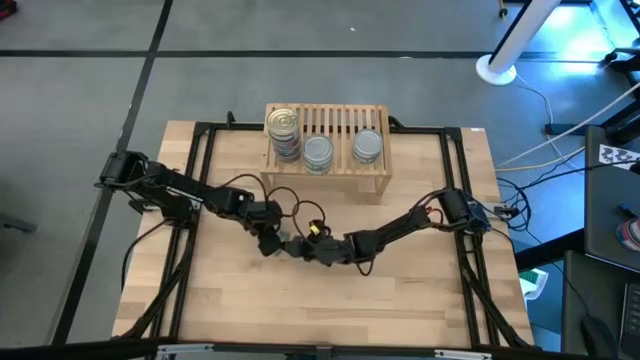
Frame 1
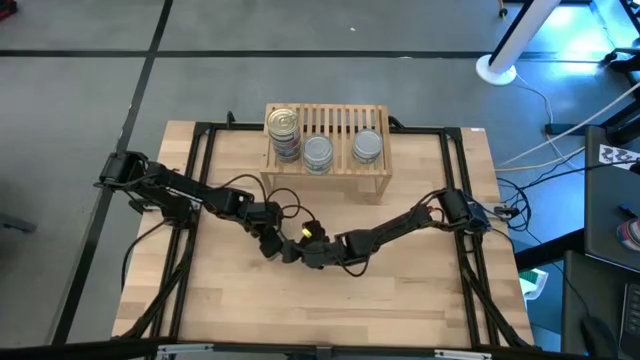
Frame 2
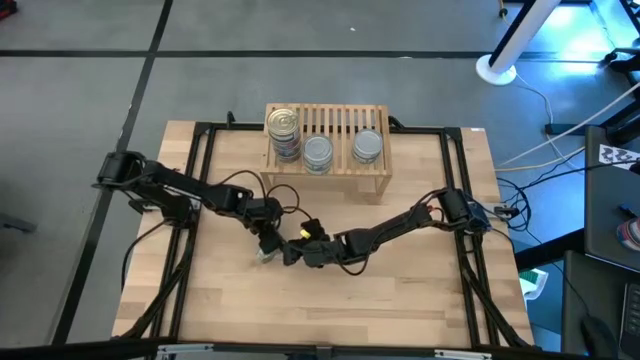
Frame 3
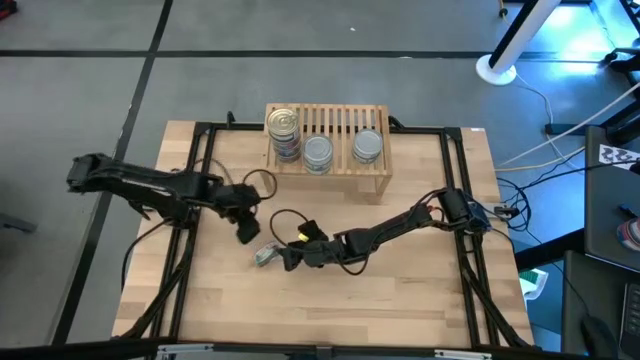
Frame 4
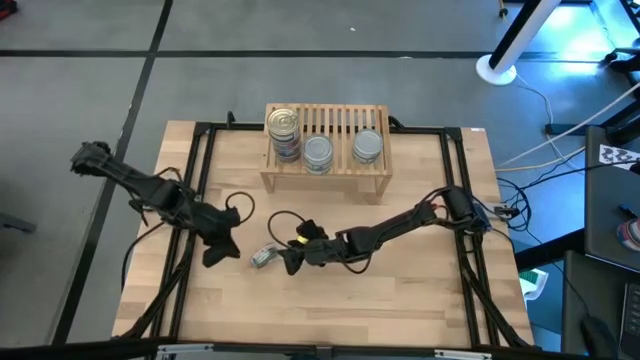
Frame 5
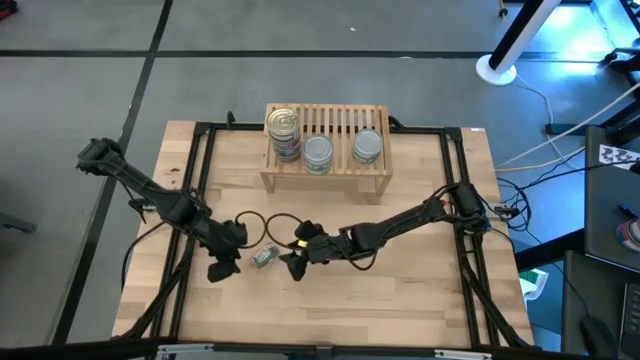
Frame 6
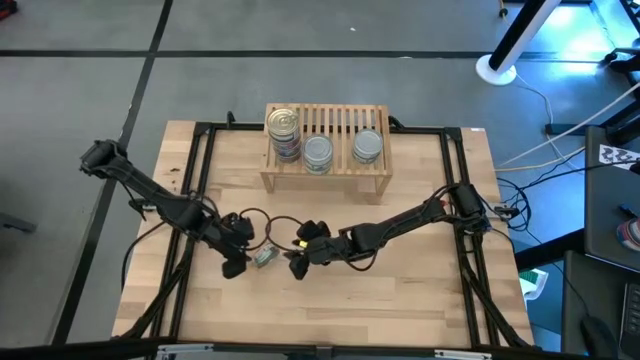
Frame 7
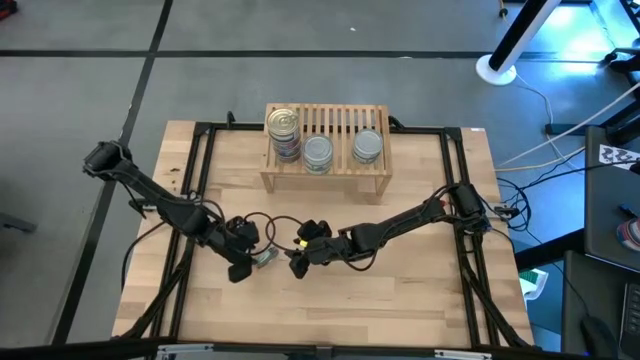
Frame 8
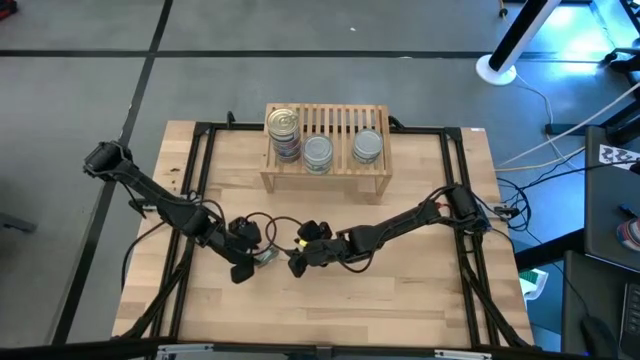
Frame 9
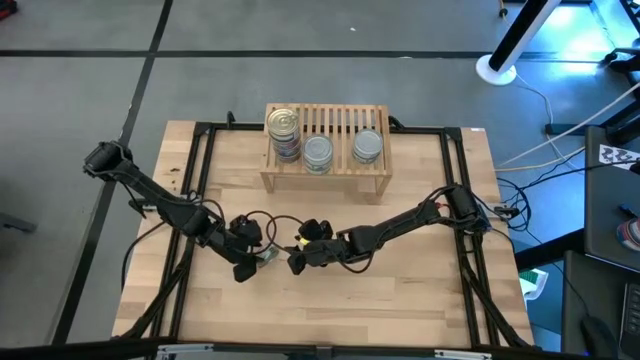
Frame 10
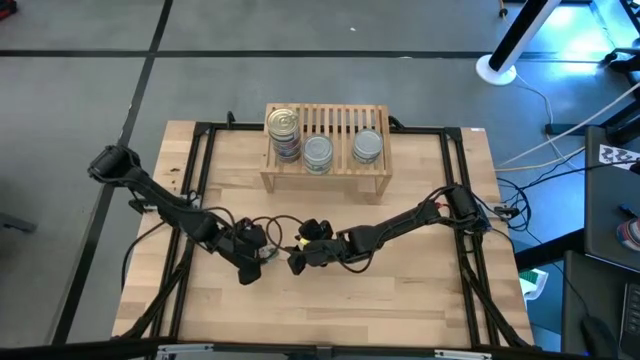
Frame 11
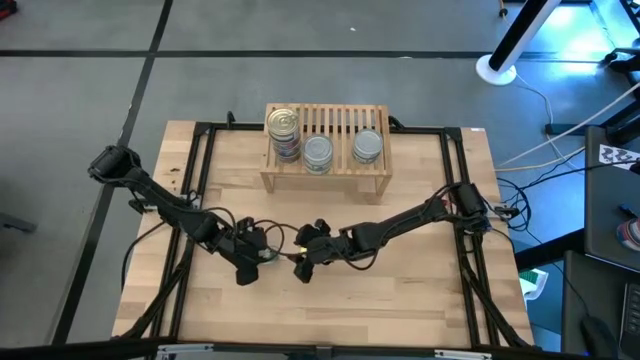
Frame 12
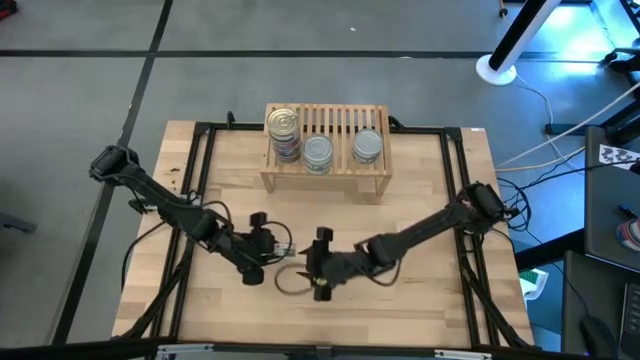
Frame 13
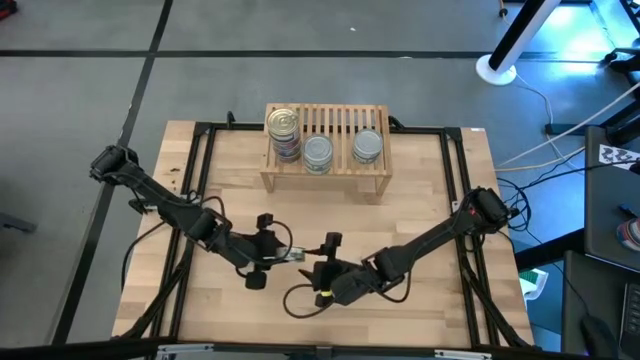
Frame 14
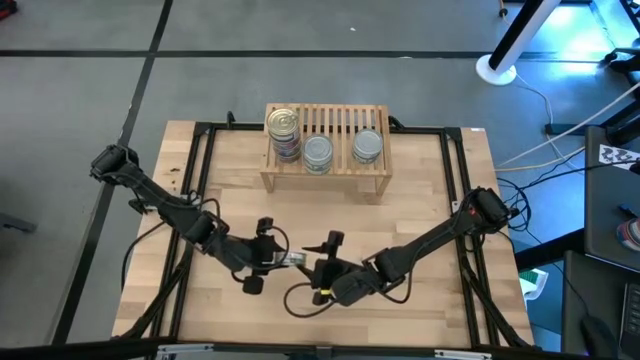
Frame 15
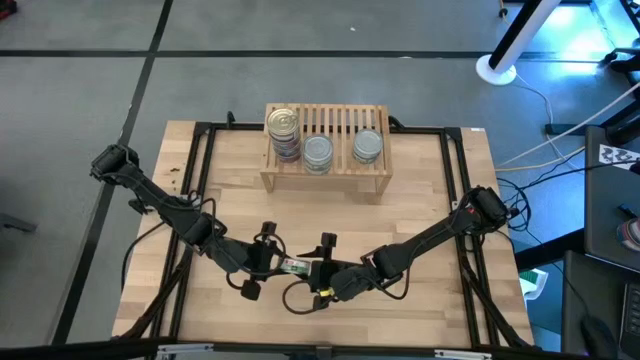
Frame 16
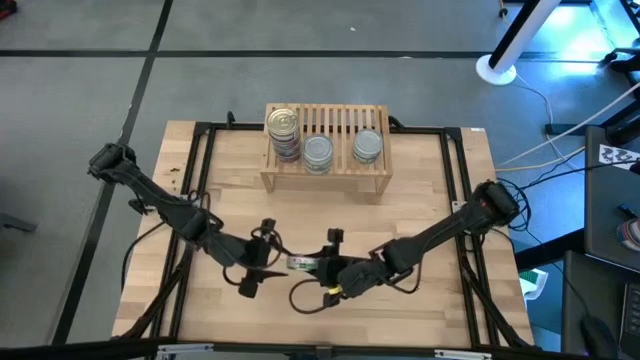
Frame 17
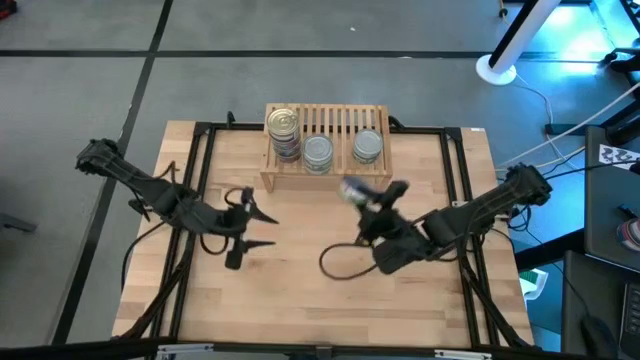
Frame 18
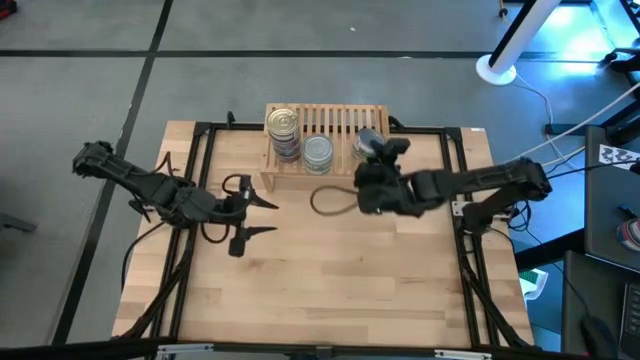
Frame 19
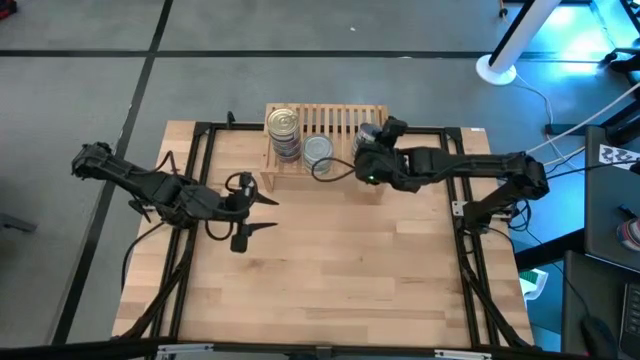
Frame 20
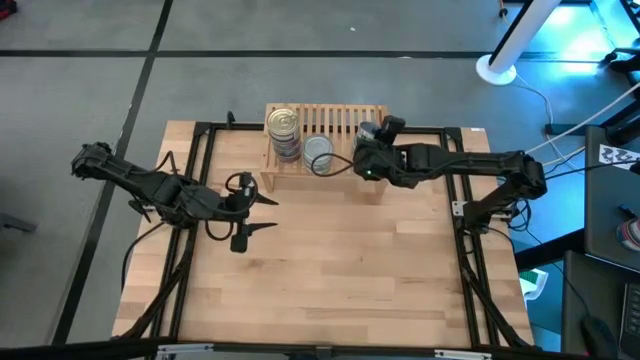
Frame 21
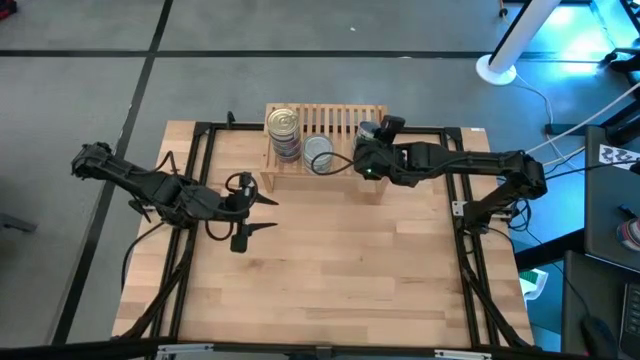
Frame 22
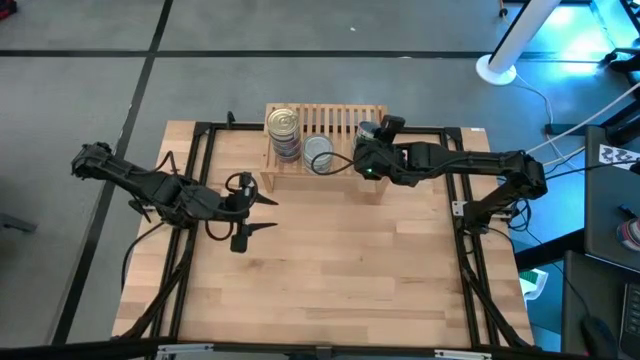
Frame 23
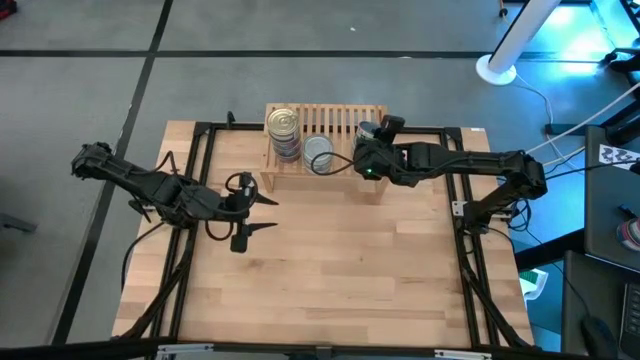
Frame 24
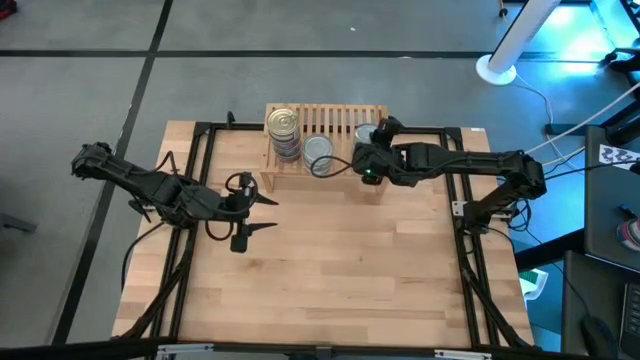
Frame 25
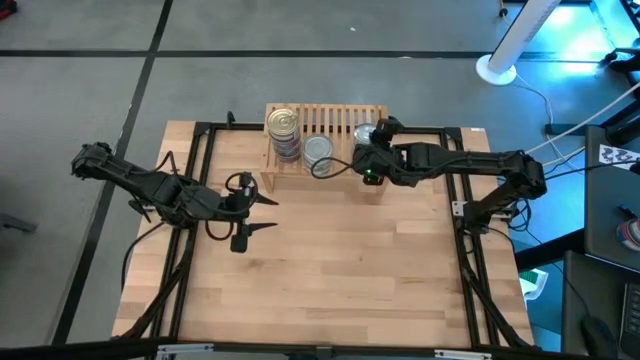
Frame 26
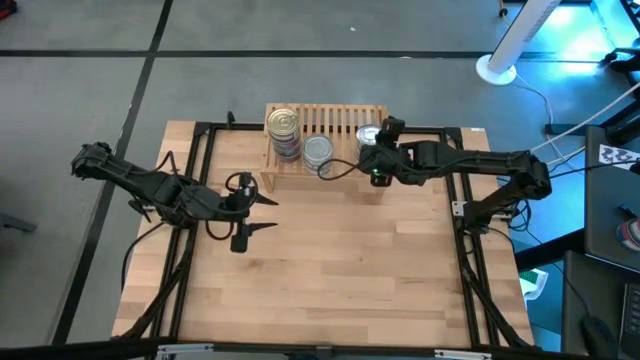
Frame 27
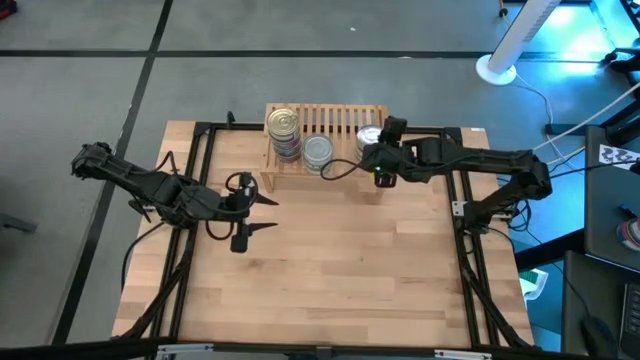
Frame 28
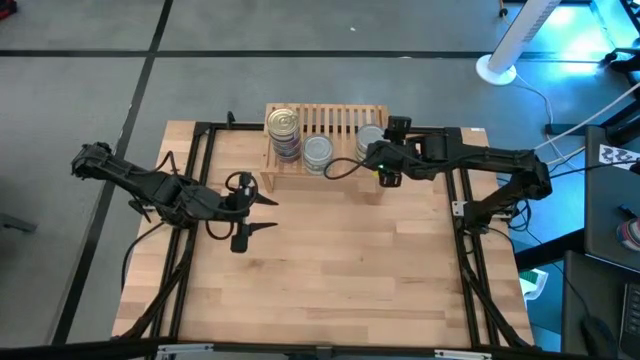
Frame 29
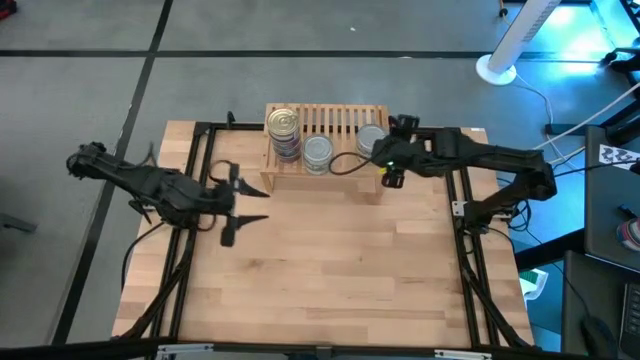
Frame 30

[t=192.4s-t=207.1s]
Task: Stack canned seafood by type on shelf
Stack the green tuna can on top of the other green tuna can on the shelf

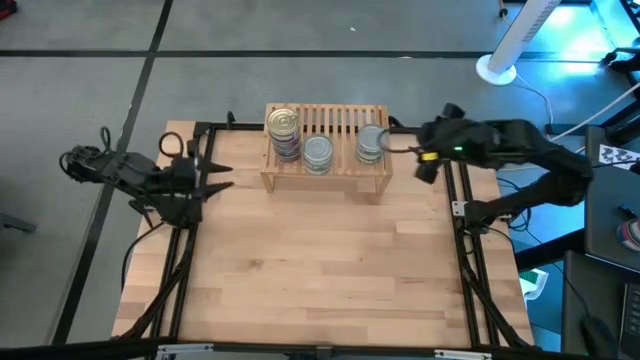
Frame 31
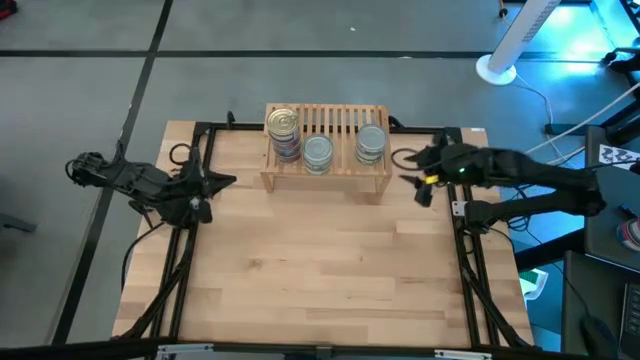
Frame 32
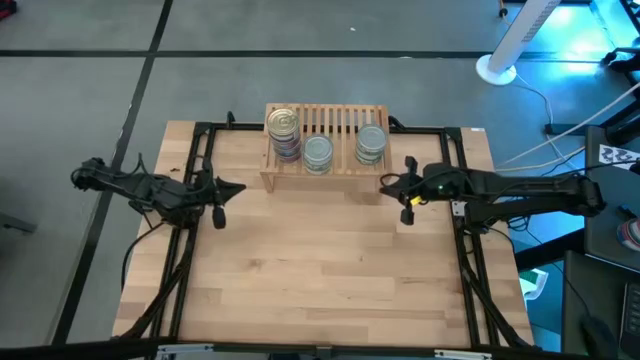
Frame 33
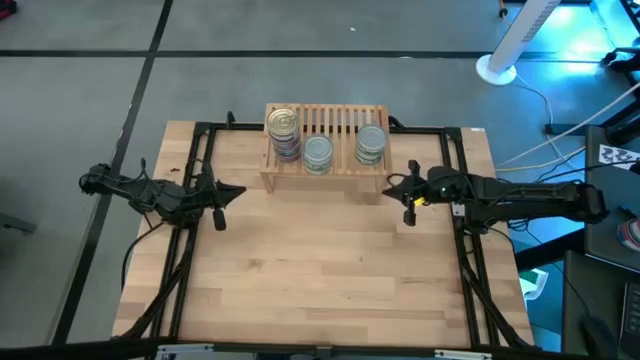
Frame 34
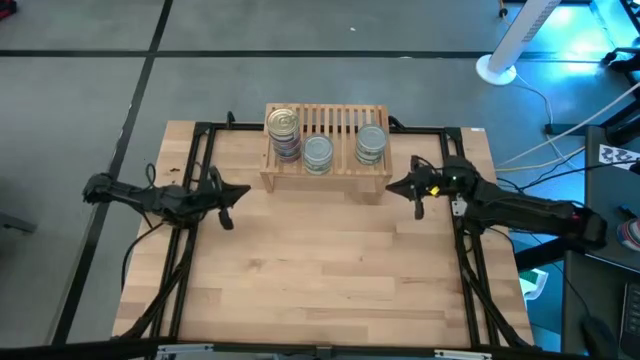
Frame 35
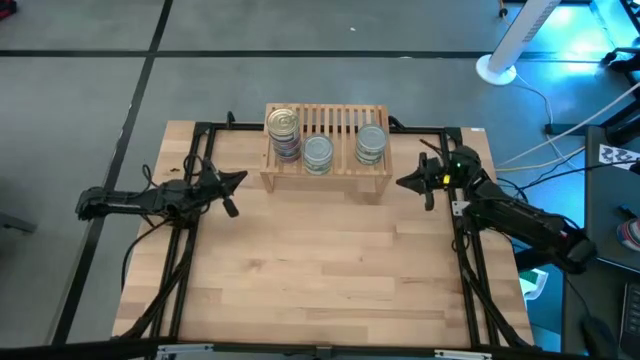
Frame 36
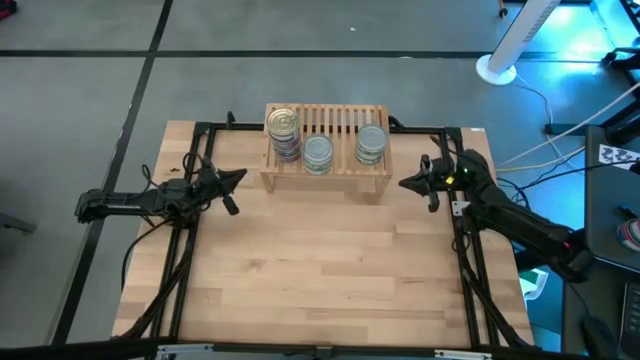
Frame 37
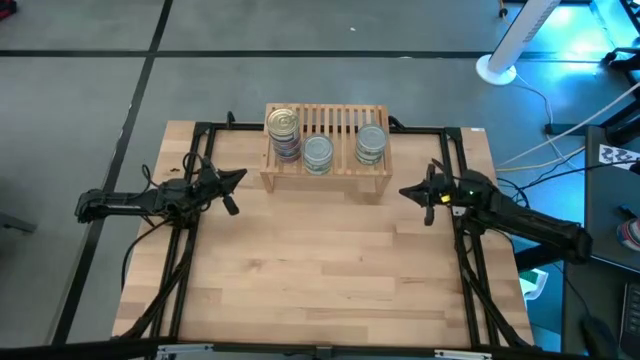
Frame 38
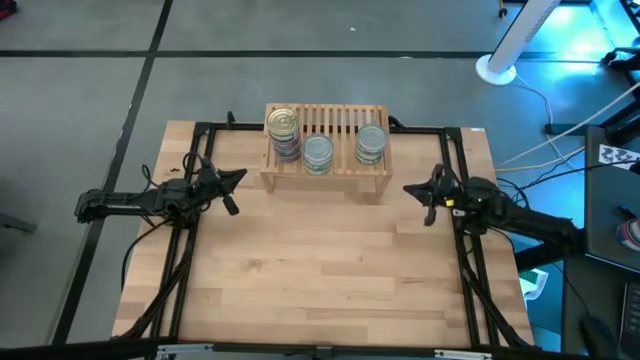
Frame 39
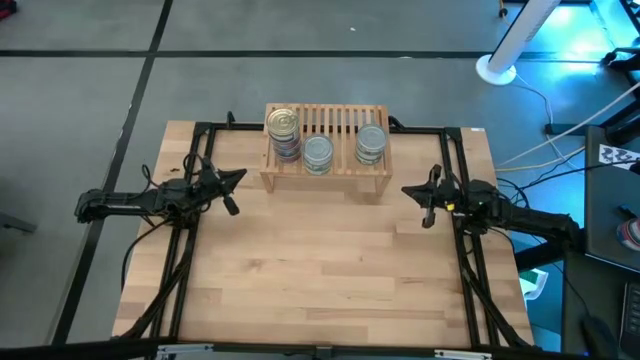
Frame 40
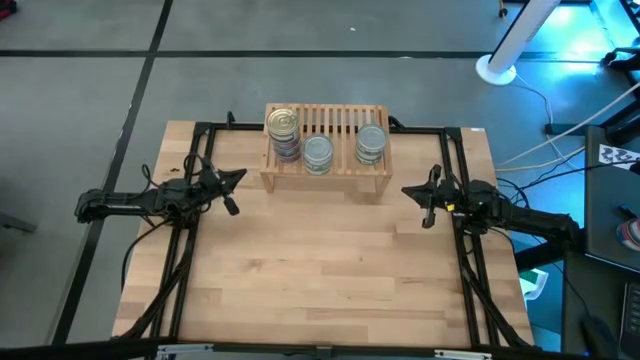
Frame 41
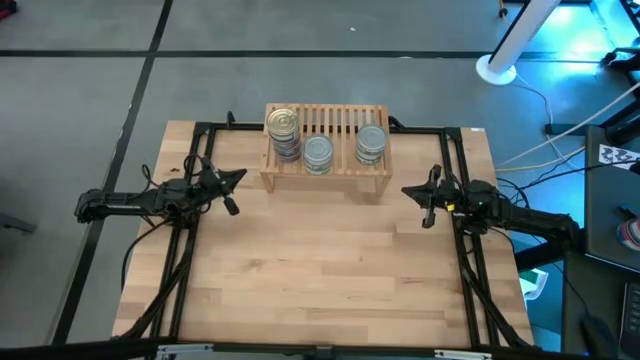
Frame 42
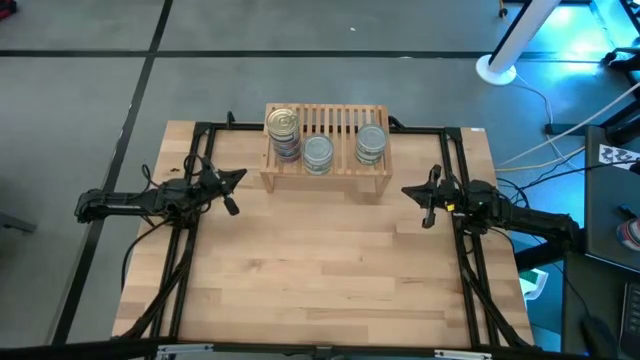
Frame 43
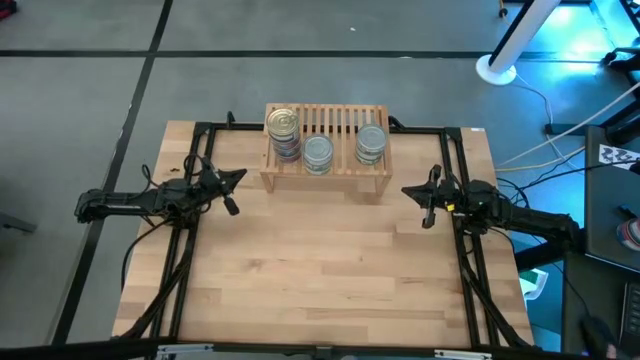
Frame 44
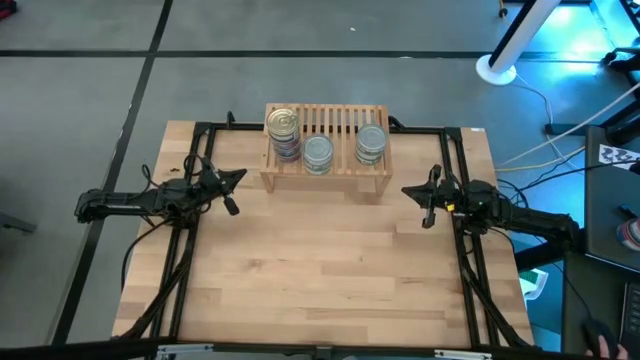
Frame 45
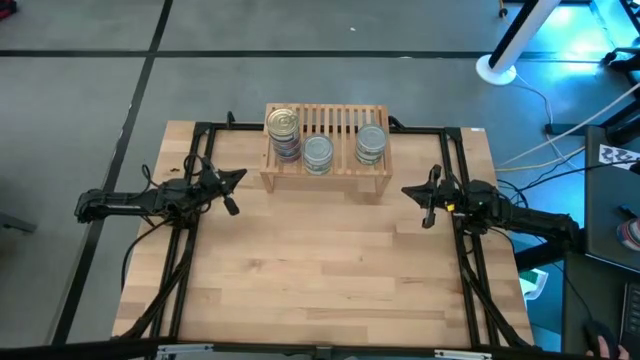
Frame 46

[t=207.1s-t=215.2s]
Return to Home Position
